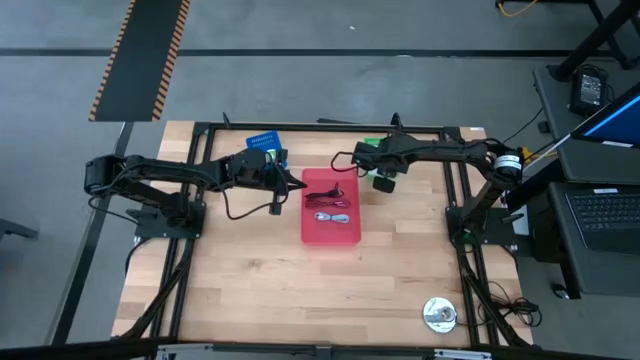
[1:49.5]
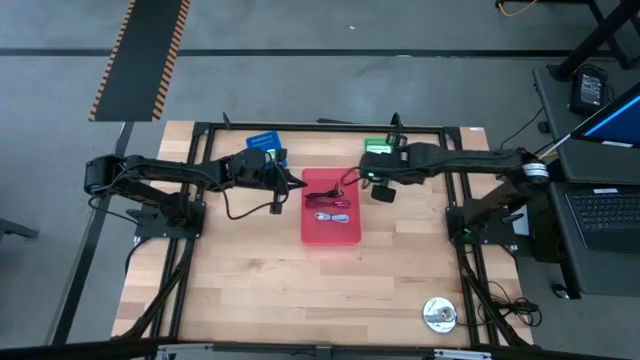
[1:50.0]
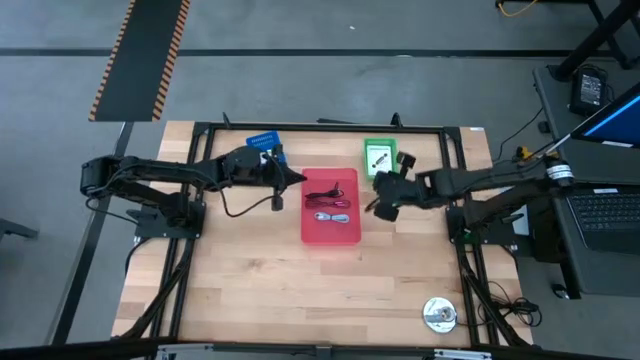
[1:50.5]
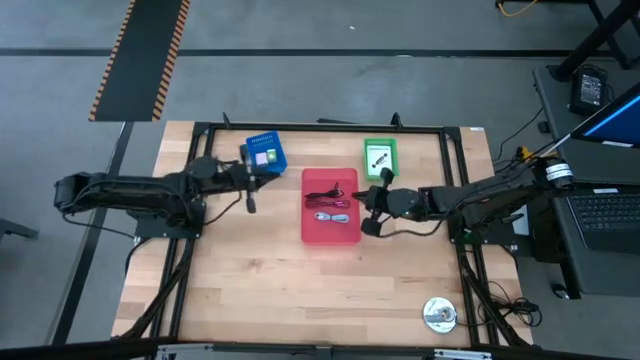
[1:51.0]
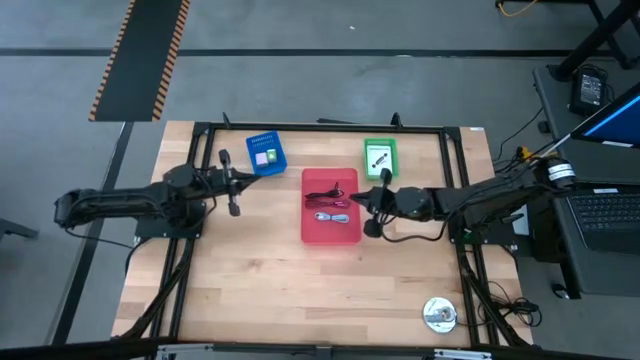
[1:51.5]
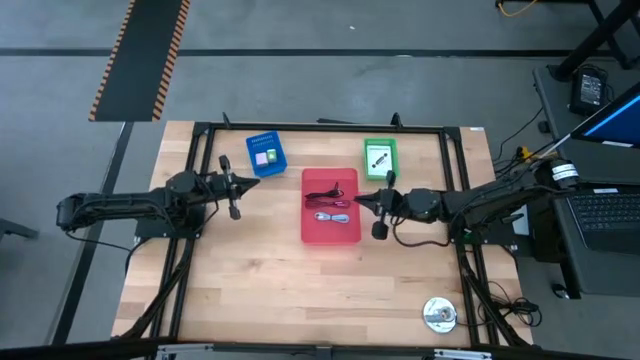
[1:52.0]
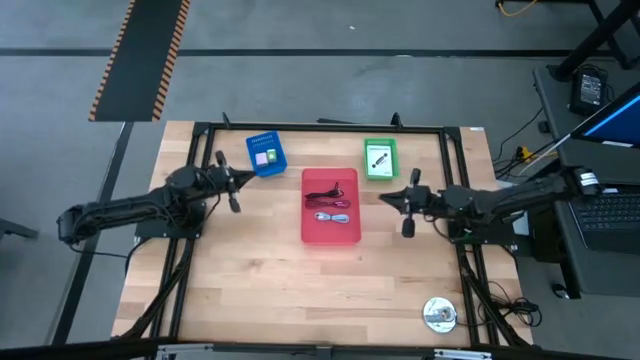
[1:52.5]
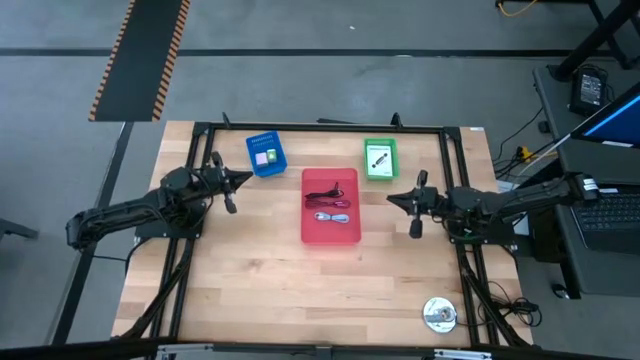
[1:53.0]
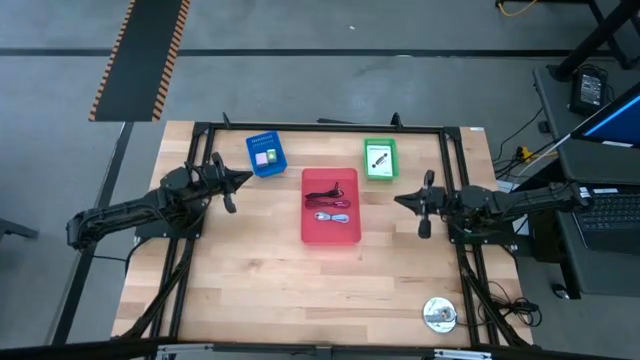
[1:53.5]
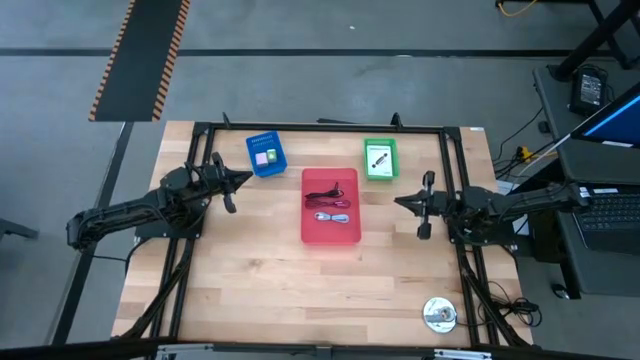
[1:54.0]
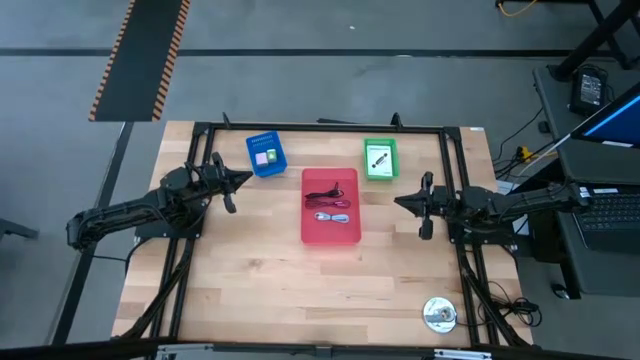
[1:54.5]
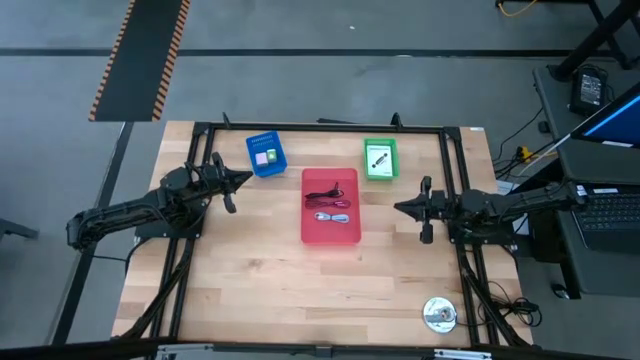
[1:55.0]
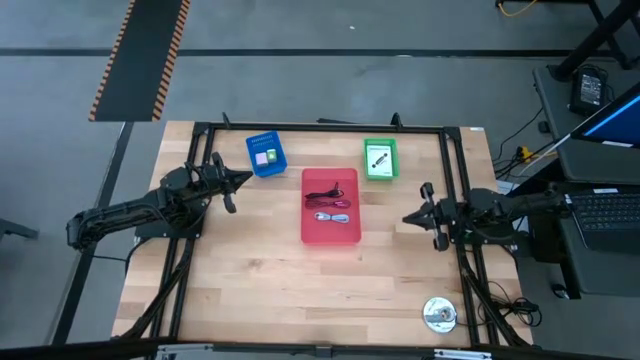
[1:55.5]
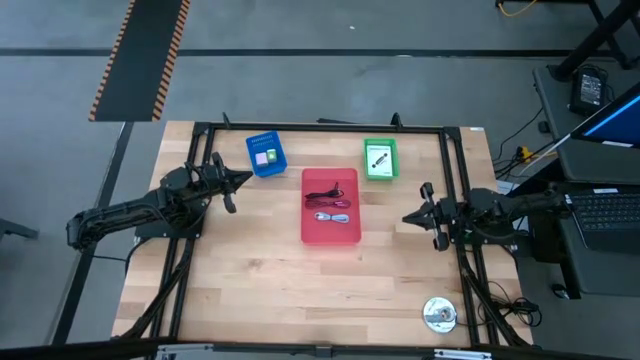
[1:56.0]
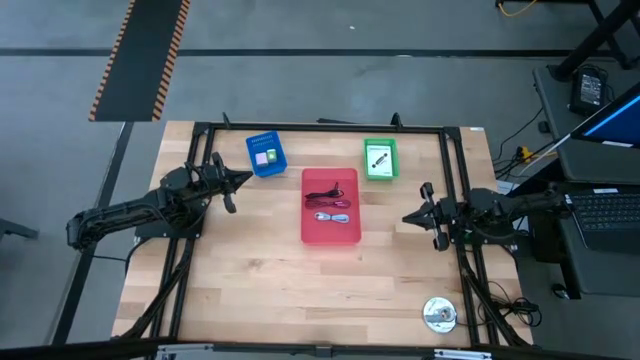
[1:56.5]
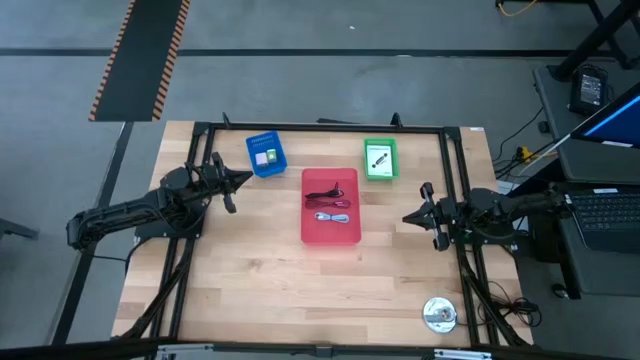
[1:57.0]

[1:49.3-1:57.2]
Task: Pick and place items into bin
Return to Home Position

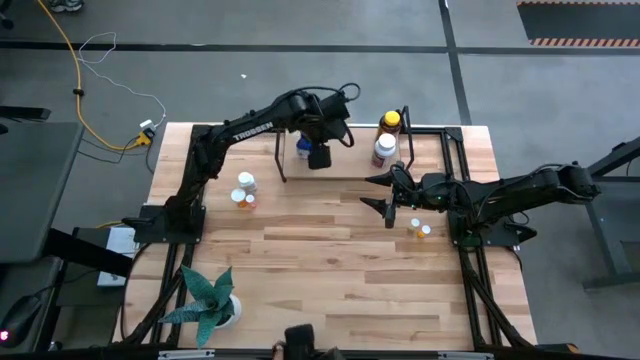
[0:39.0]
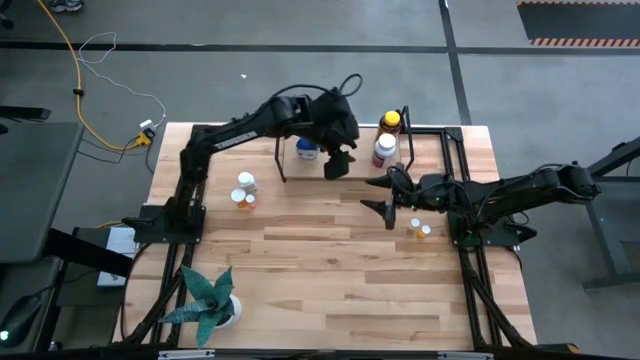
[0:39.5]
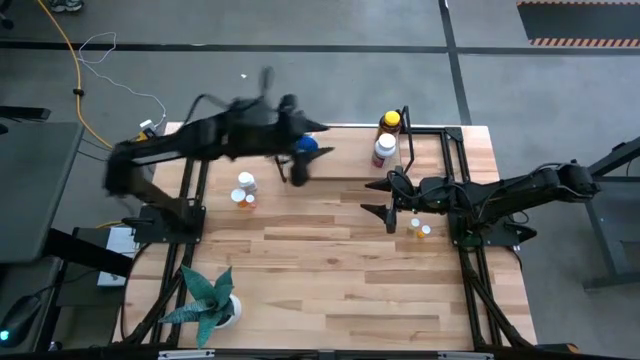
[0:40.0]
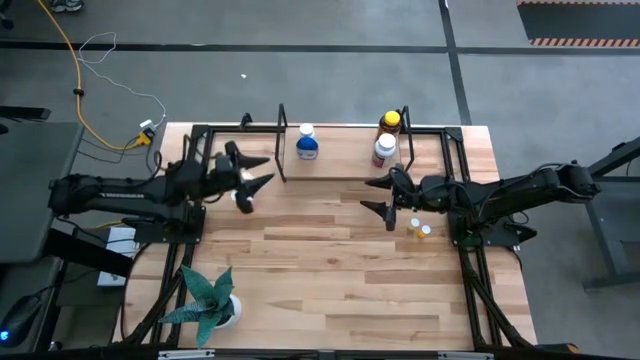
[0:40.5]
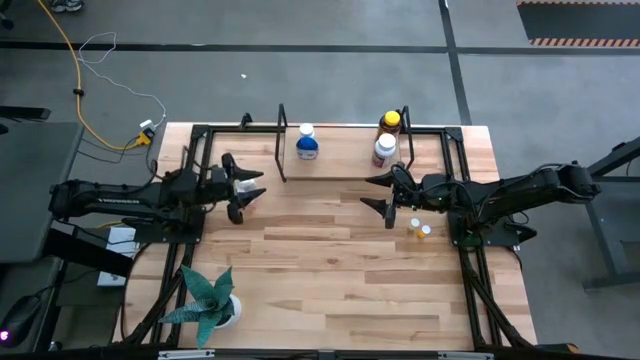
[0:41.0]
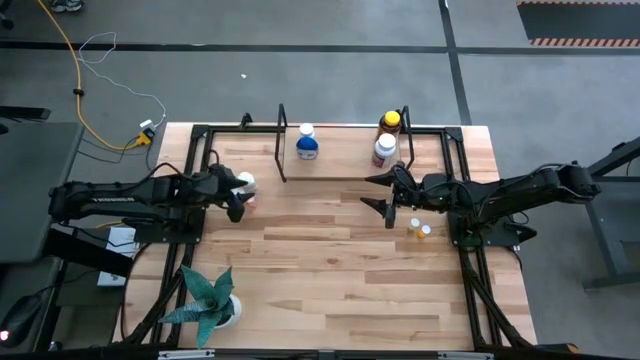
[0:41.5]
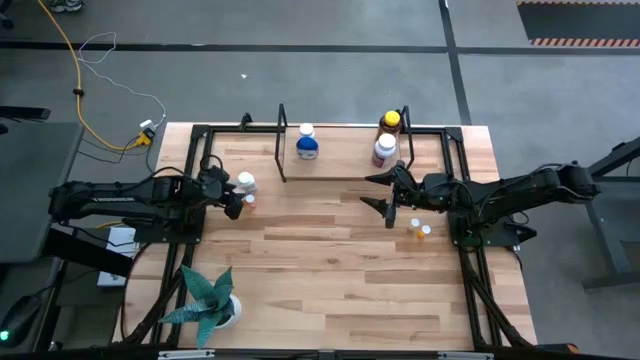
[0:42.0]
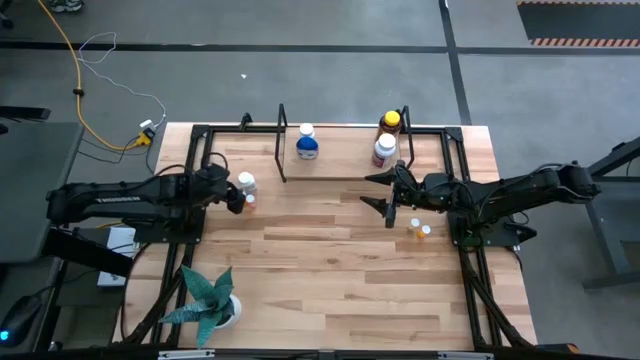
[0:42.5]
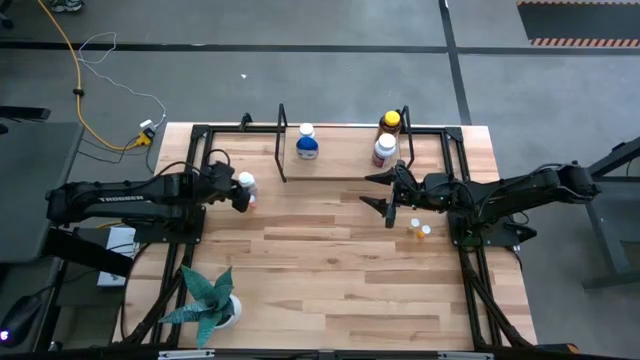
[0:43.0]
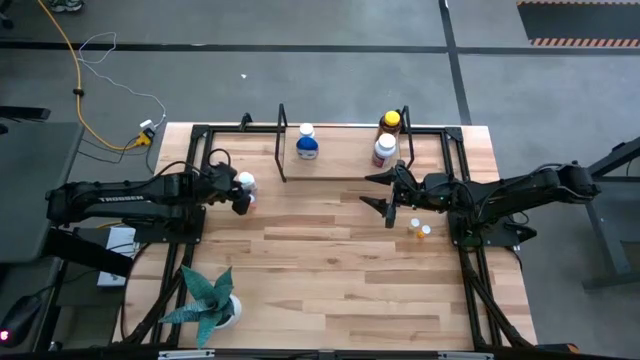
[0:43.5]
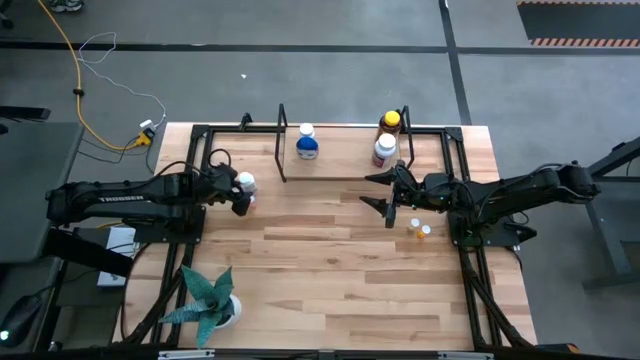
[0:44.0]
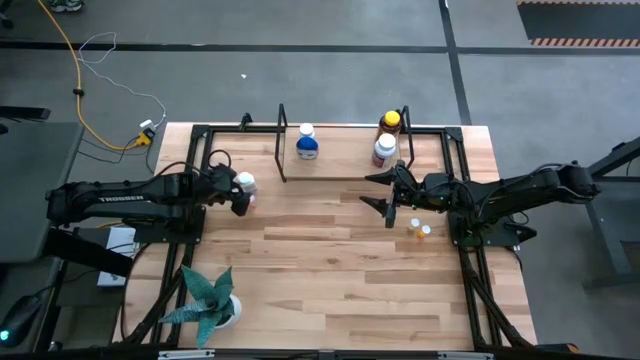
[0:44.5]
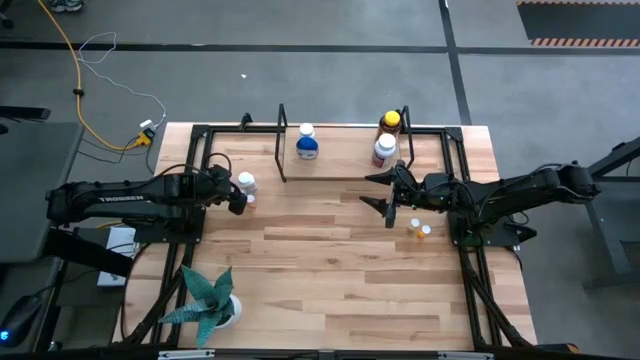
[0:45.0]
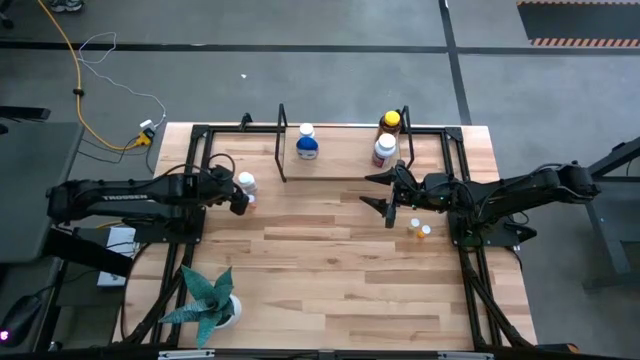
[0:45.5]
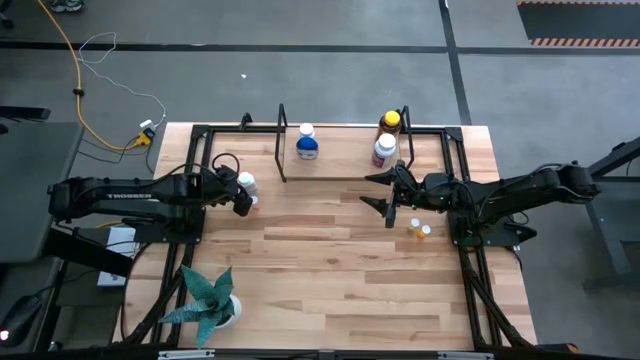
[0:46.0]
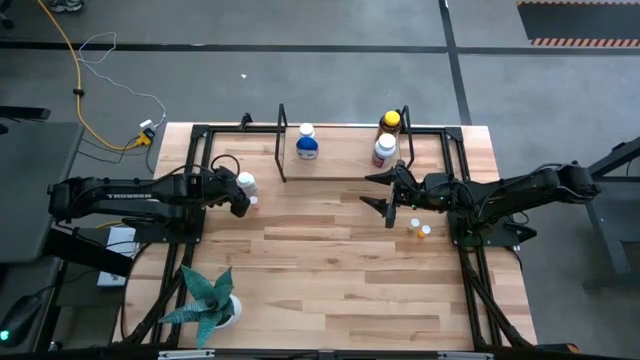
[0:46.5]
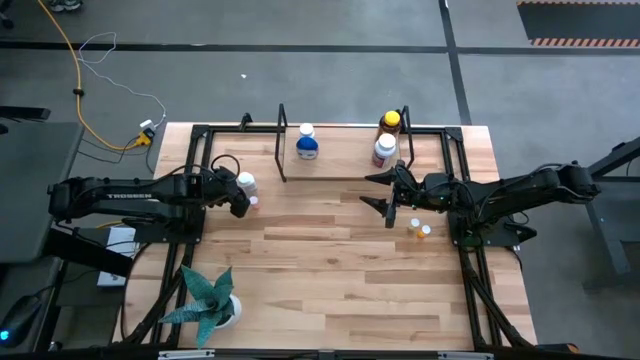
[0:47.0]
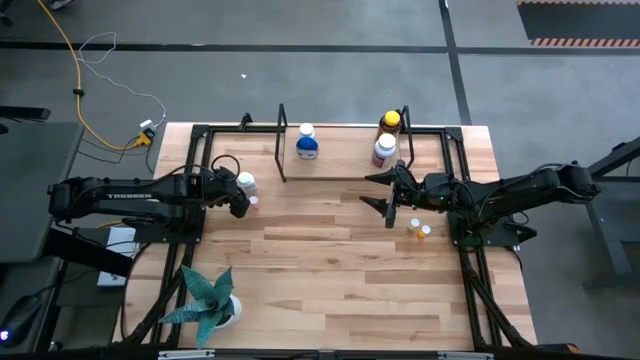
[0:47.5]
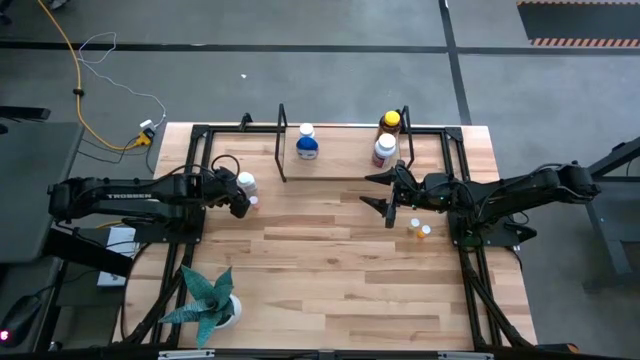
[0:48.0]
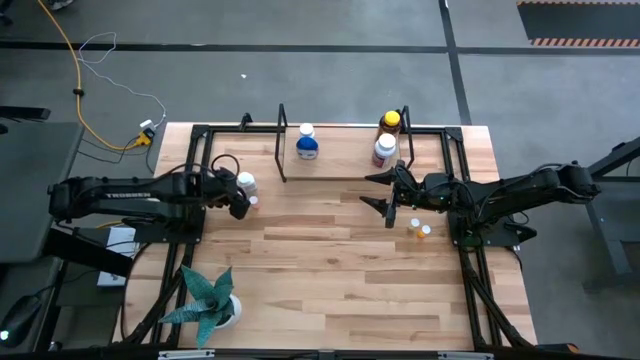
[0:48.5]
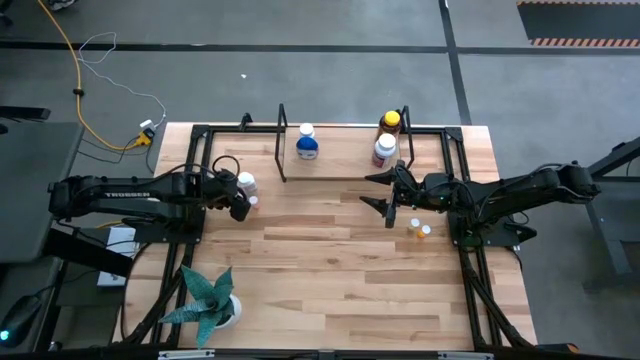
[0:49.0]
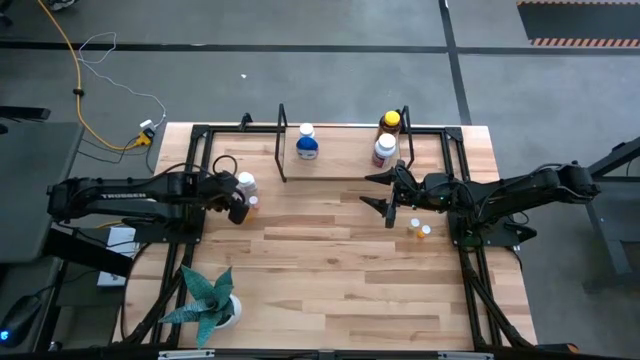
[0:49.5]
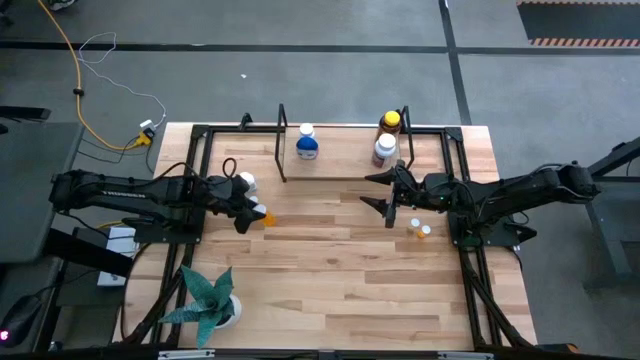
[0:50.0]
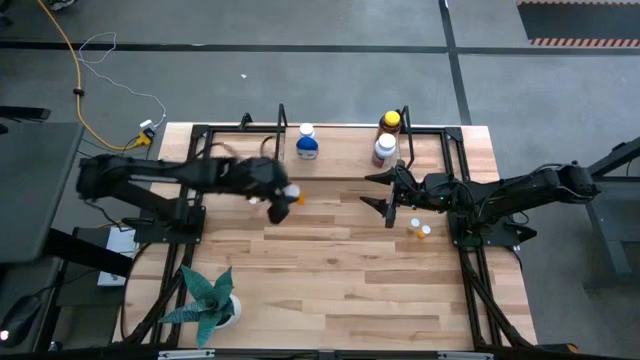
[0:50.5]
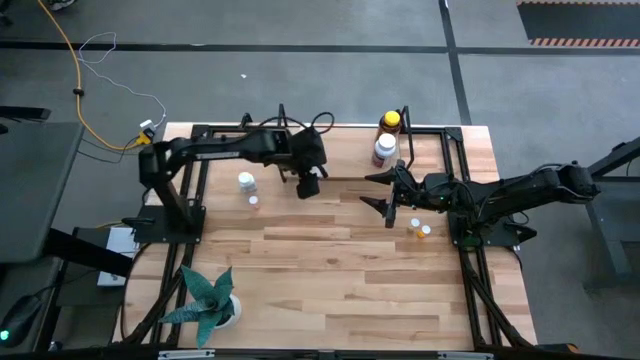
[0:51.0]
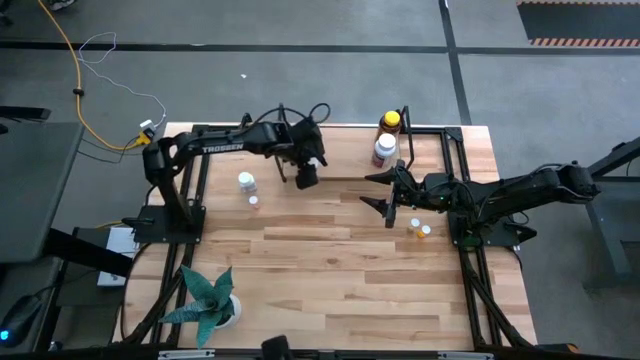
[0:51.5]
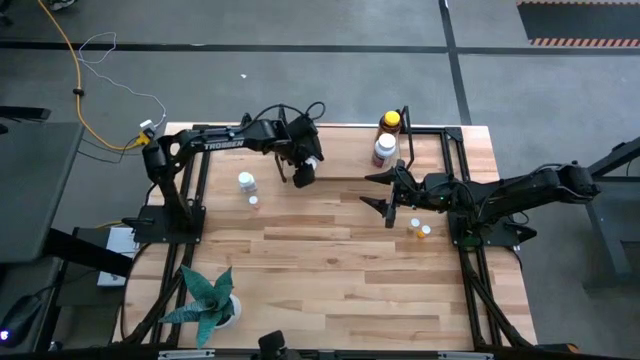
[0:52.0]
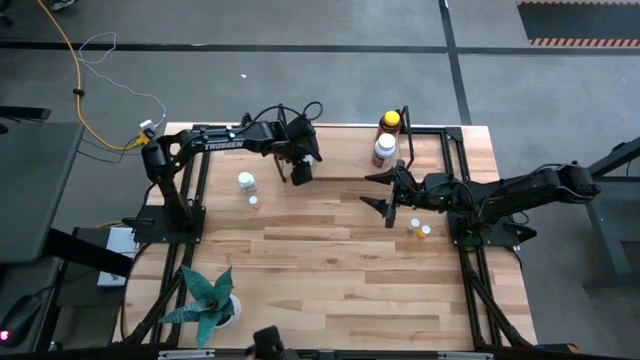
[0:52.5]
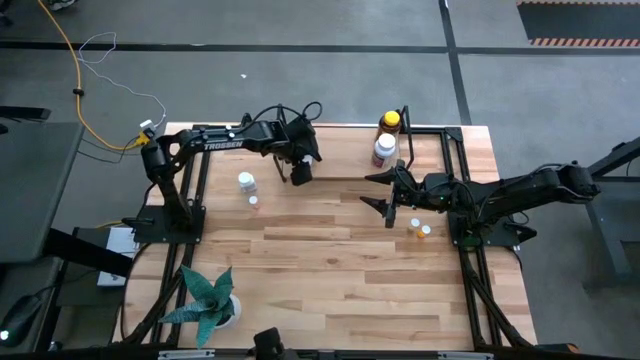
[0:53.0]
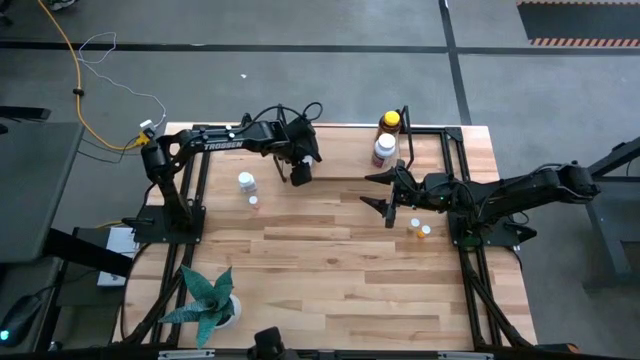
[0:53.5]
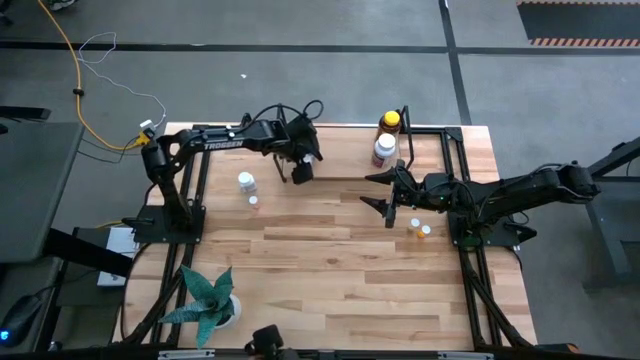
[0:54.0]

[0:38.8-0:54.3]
Task: Pick and place medicine bottles onto shelf by color
Put the large orange pill bottle on the shelf
